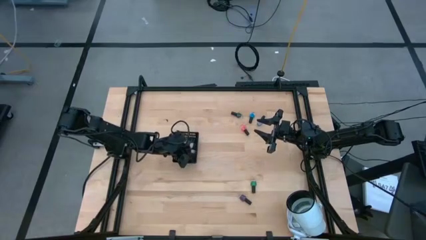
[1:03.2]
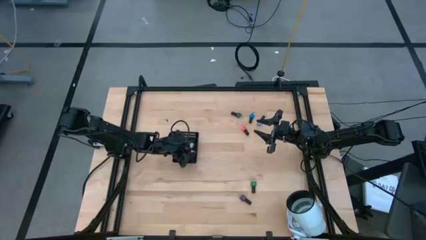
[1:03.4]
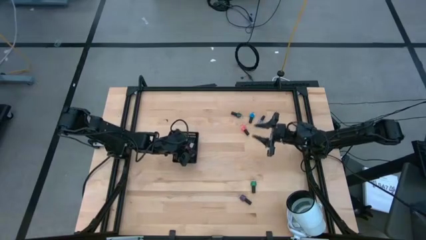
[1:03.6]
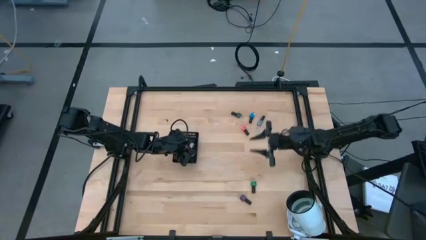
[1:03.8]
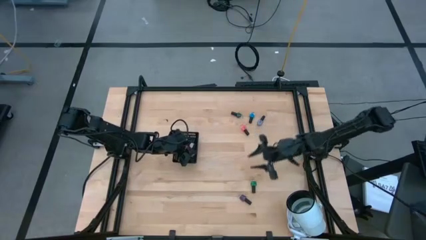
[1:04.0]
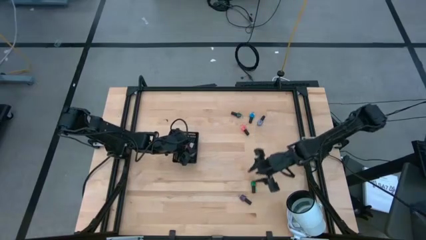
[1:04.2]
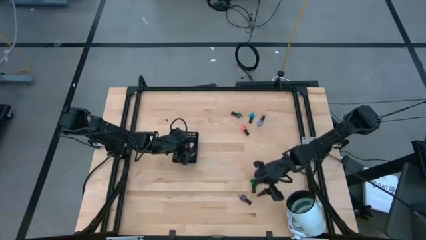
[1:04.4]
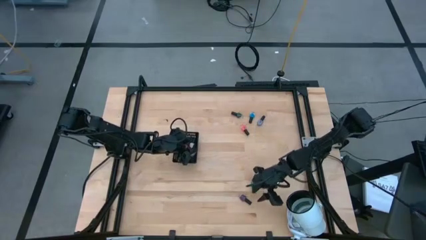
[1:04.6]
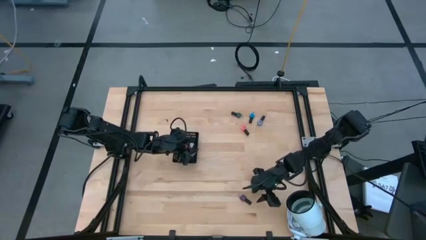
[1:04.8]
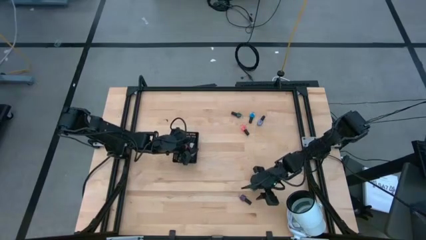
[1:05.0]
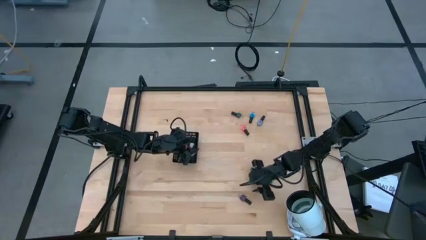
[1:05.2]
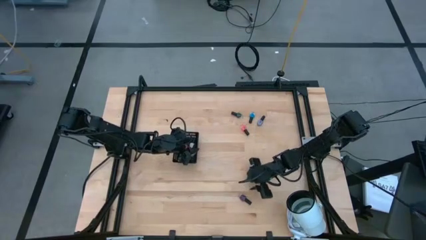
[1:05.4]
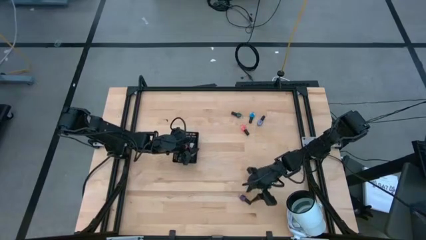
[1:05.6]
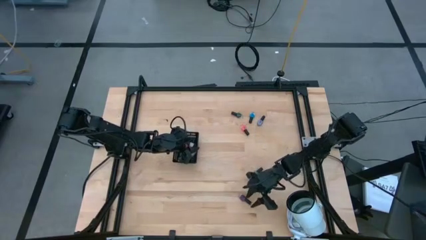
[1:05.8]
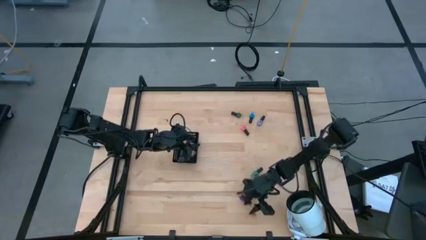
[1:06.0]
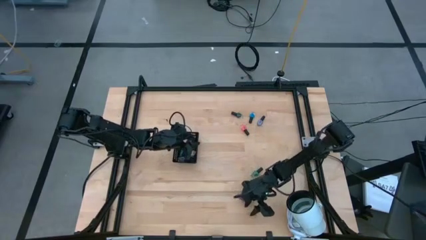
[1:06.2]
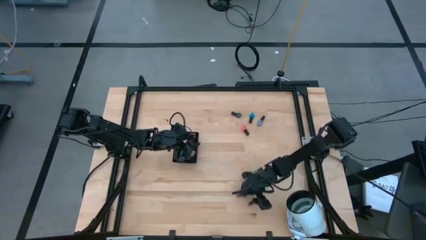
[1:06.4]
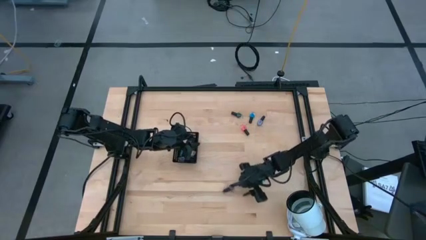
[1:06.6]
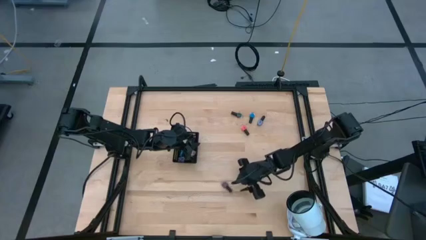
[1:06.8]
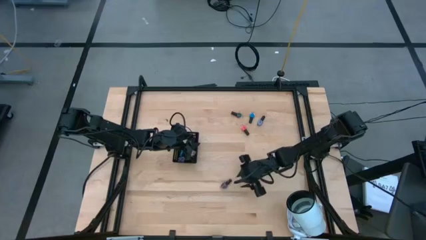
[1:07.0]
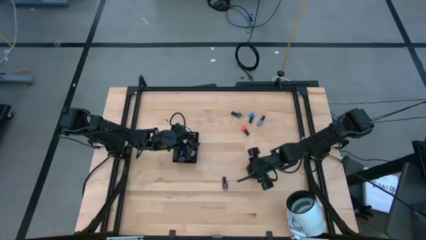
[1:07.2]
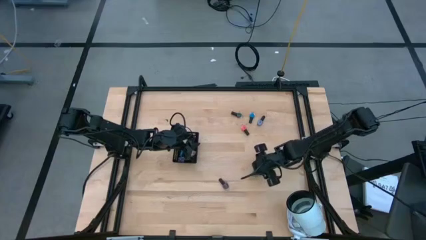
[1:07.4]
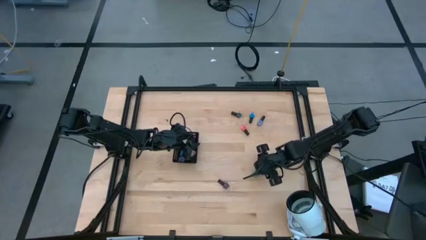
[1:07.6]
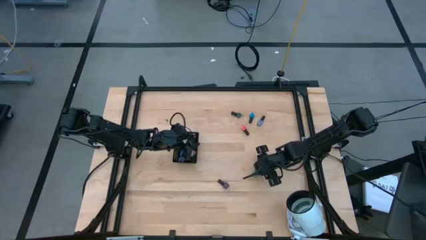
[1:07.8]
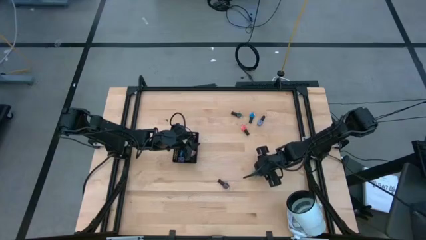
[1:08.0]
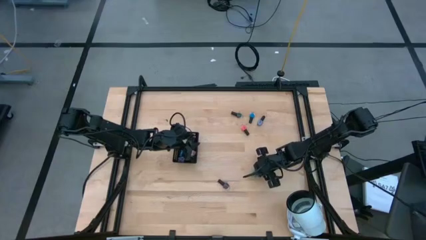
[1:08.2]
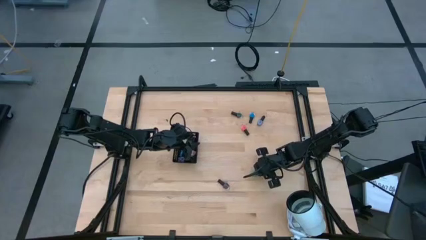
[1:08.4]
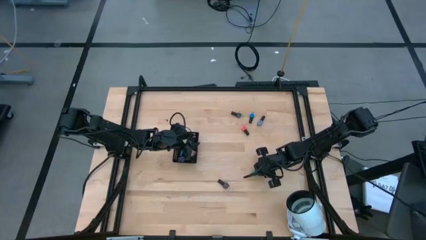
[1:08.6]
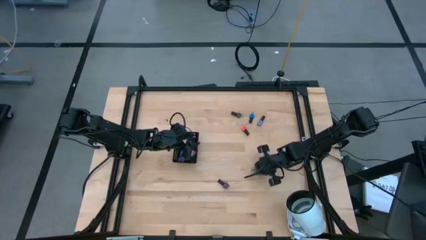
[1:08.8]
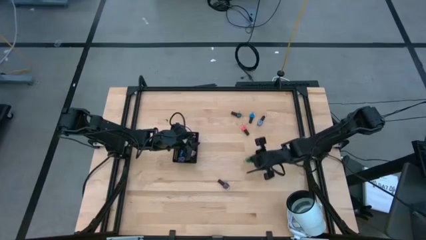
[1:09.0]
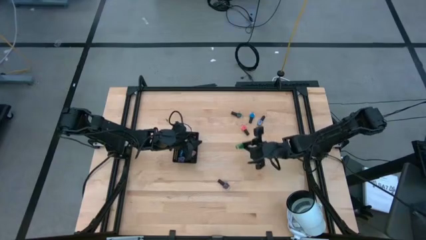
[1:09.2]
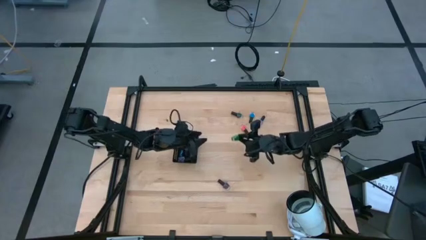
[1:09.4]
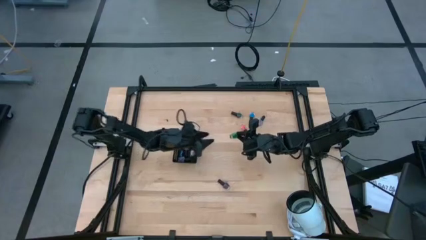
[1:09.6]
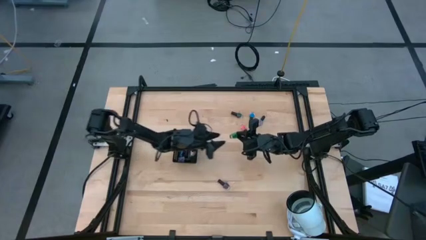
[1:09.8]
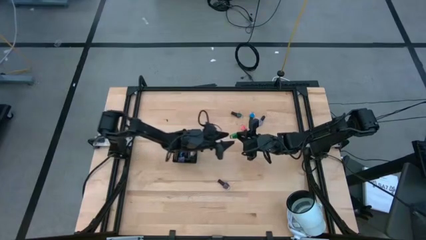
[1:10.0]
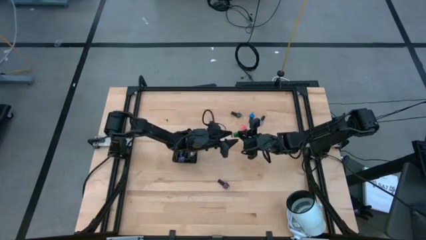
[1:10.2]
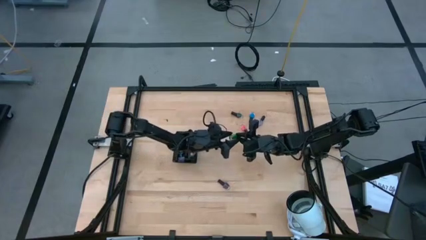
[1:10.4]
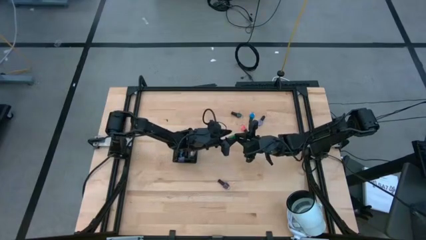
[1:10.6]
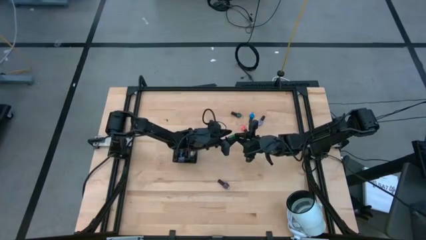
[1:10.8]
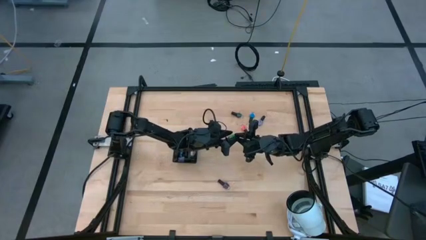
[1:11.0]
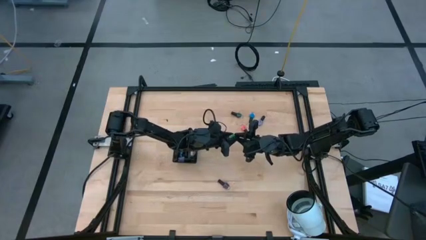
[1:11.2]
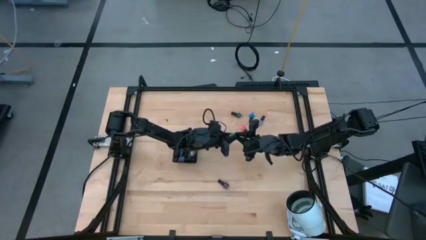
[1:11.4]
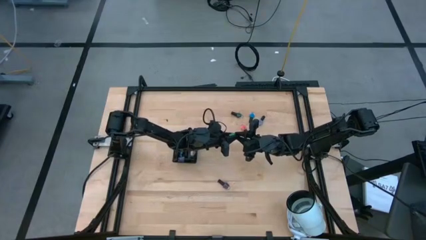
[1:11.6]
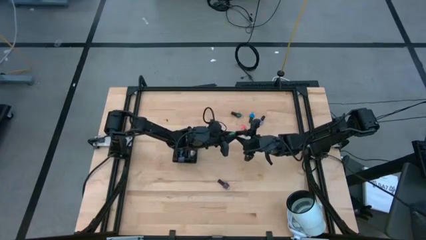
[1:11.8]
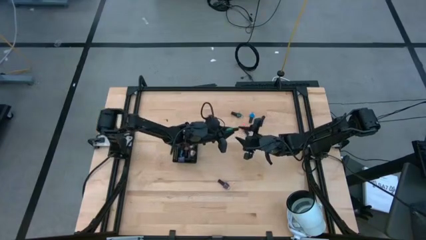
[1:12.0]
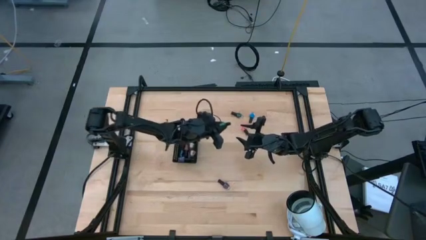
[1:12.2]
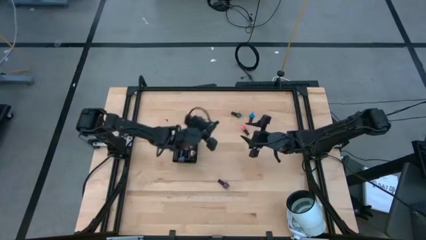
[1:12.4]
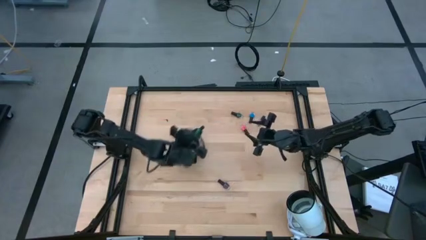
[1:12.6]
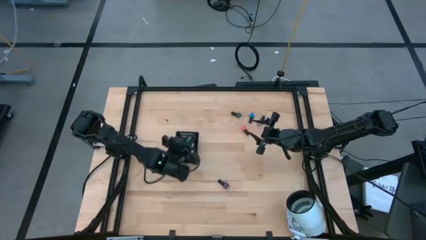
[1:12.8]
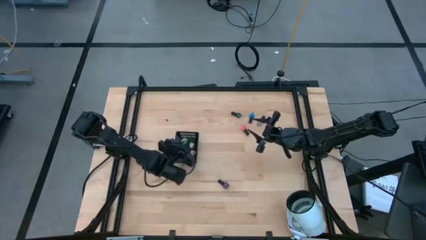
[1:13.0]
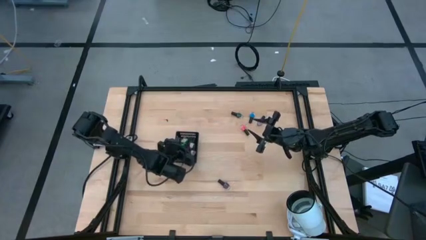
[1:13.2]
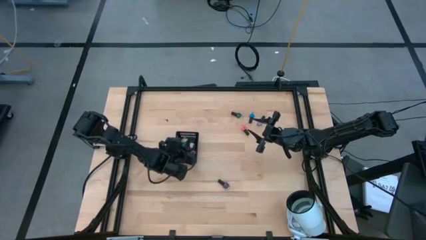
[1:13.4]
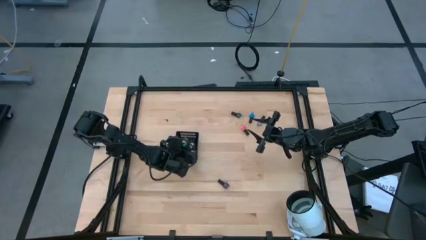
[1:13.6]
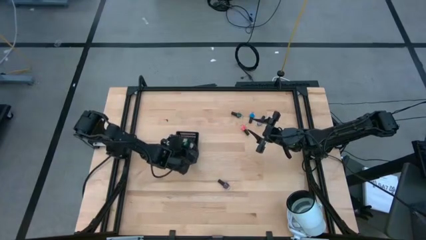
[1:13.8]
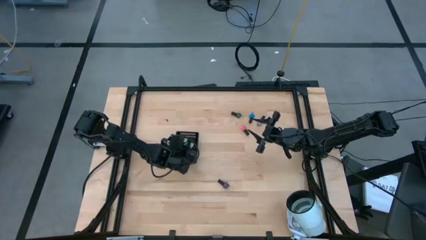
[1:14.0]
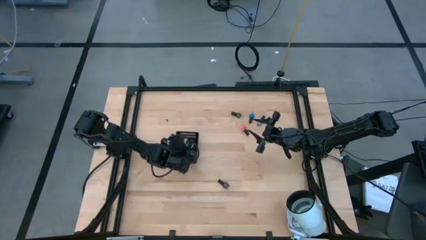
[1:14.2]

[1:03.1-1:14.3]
Task: Pick & Place Nail Polish
Put the green nail polish into the basket
